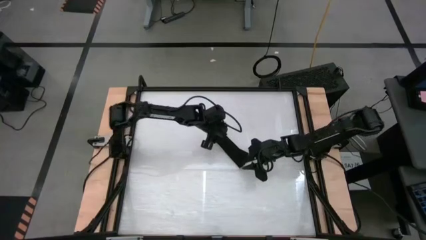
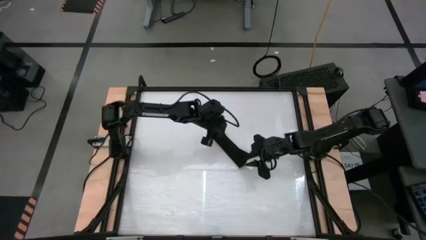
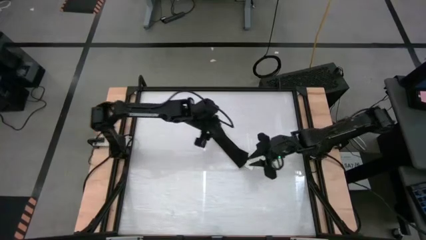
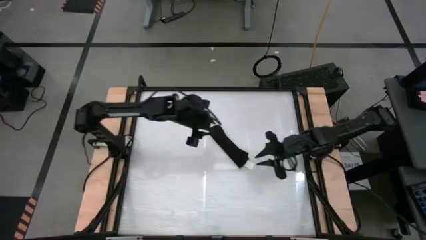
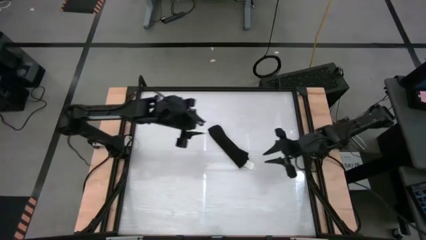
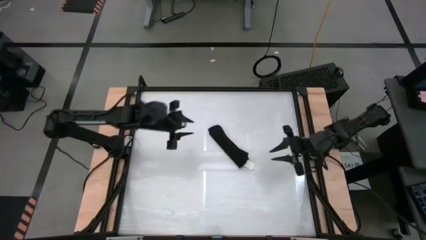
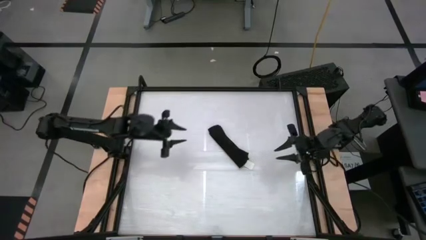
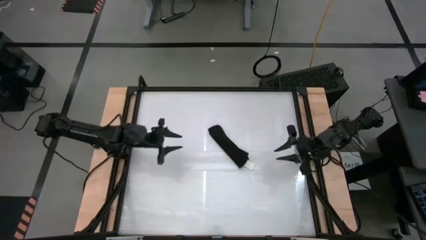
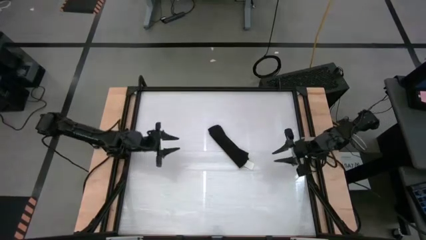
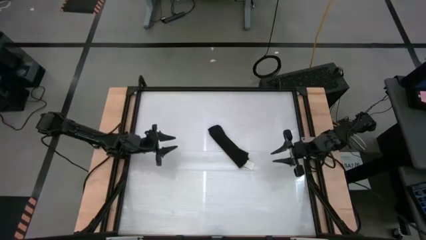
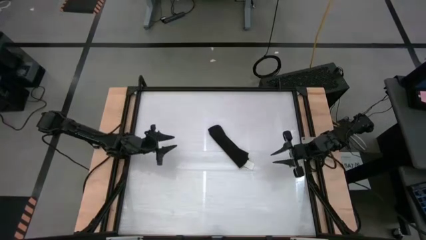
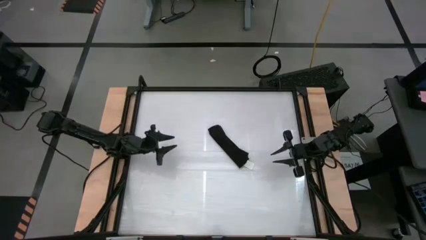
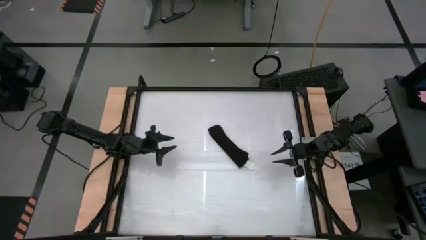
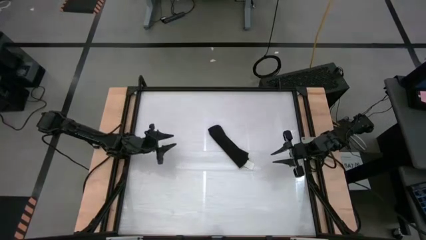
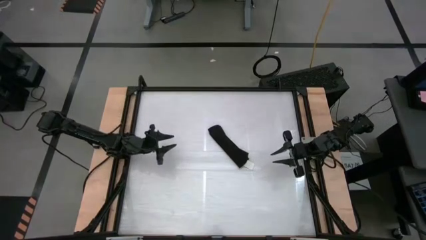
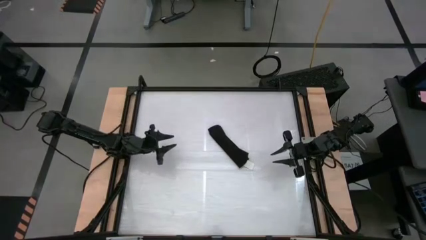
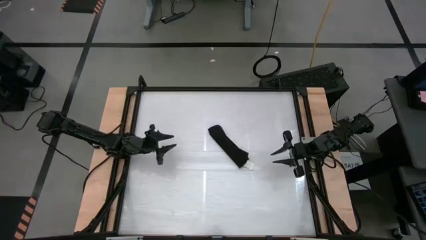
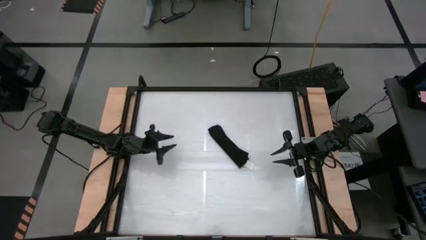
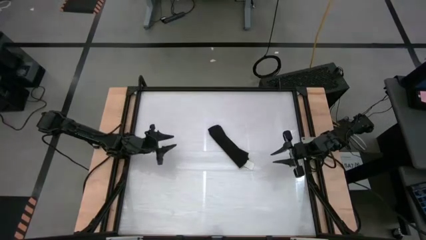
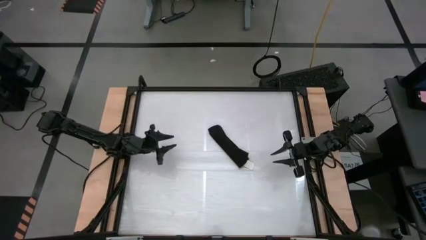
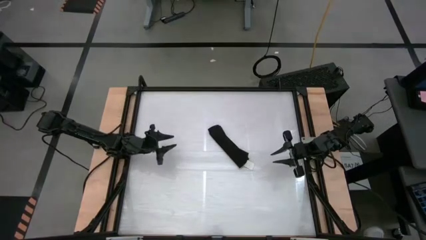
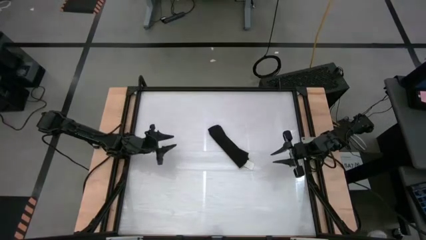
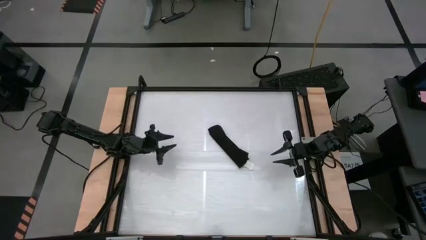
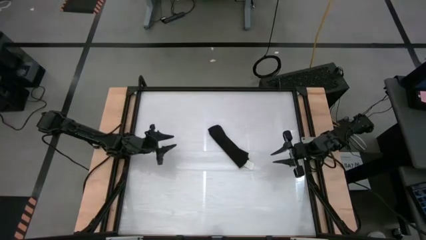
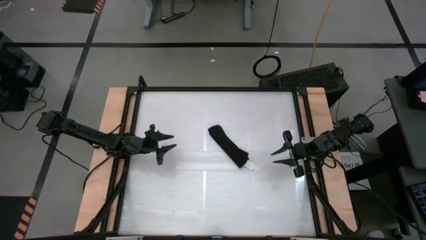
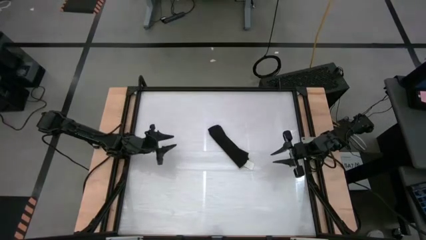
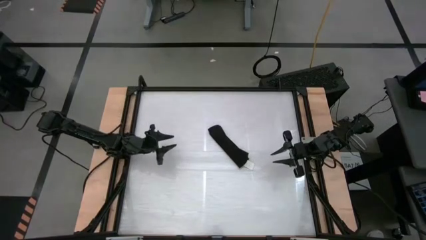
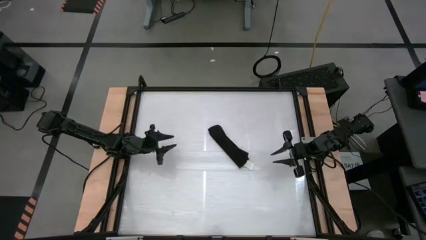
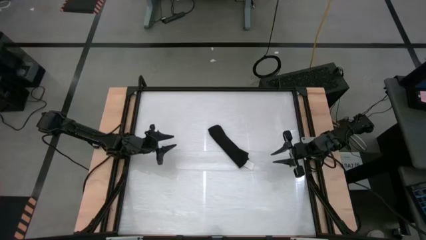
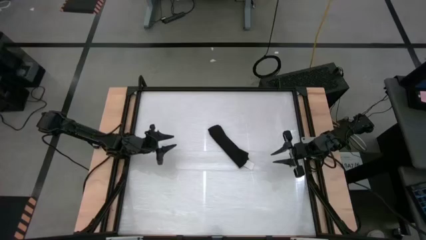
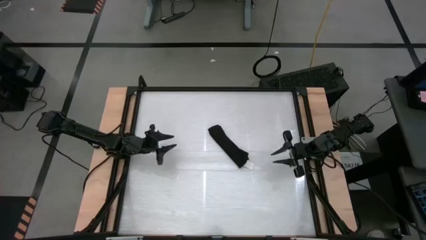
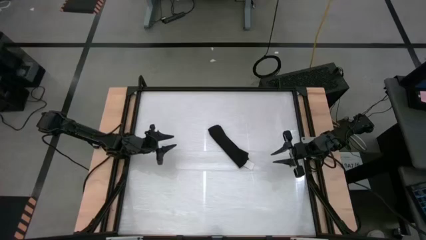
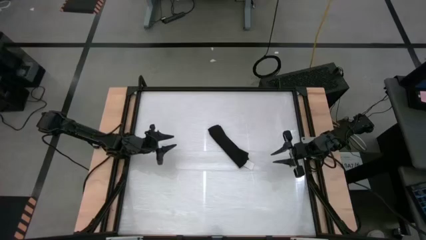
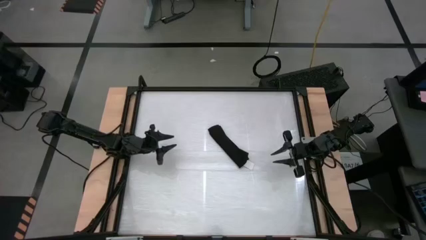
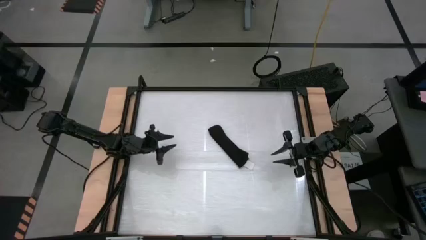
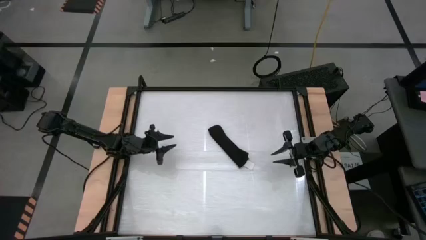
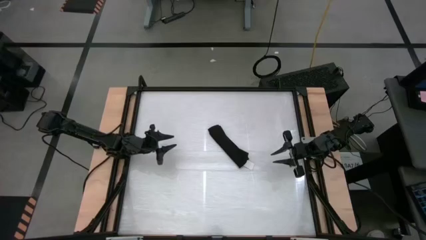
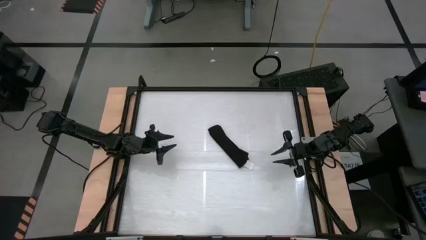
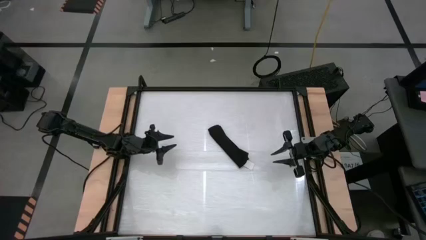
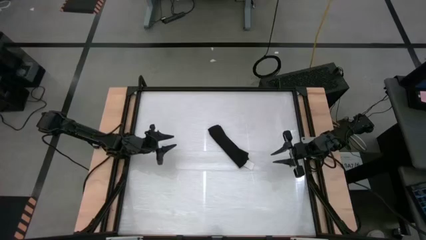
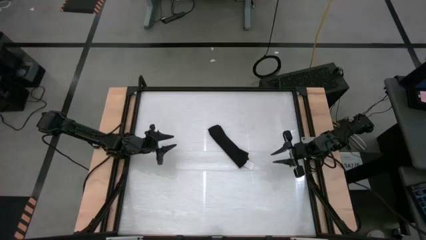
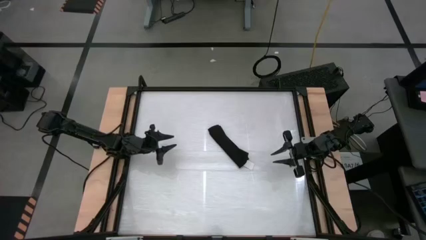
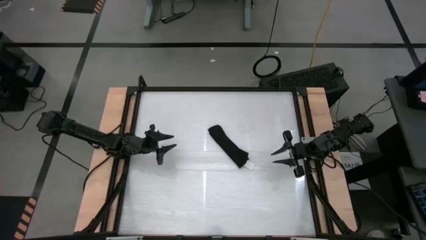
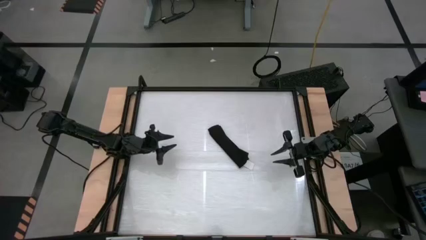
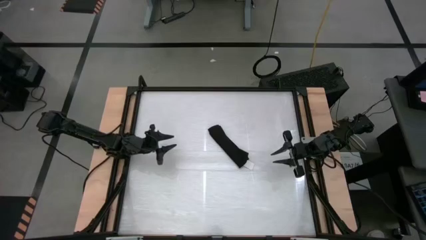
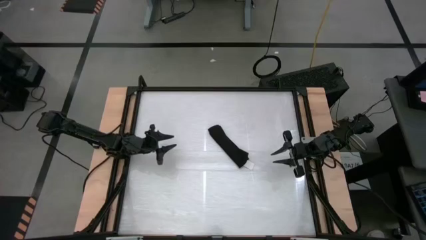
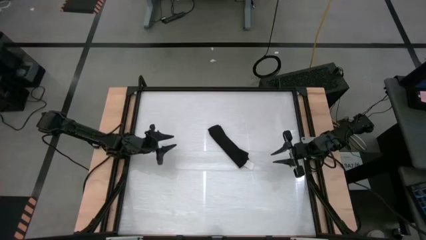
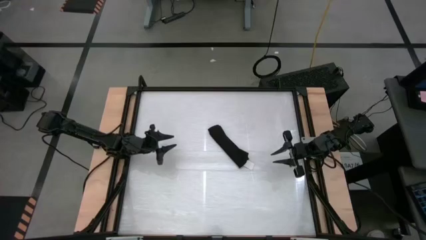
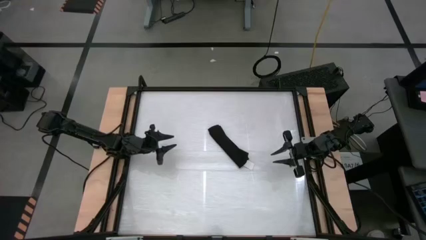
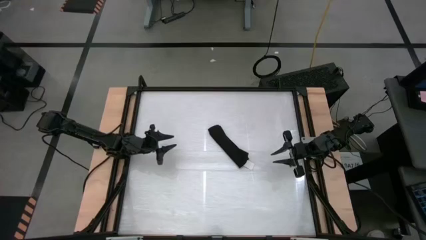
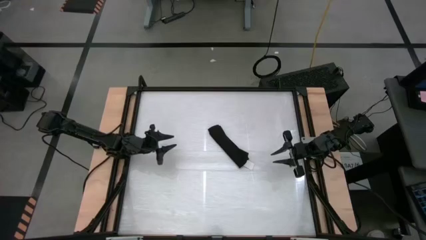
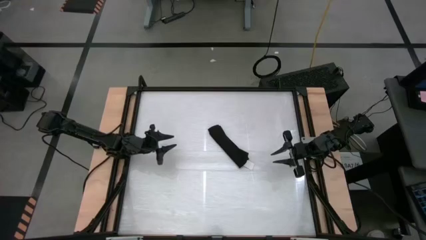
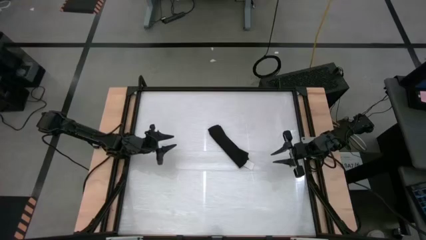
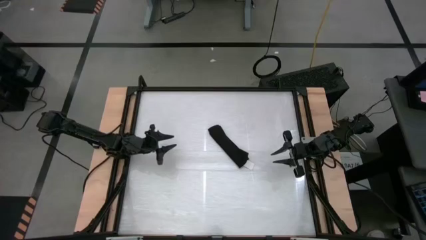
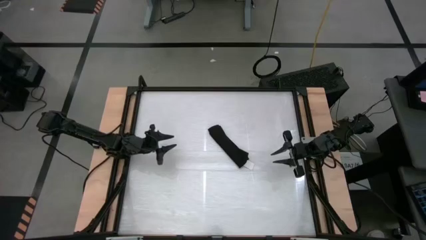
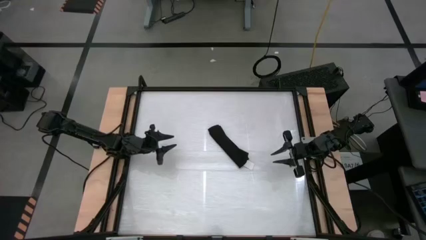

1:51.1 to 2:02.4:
Task: Roll towel
Return to Home Position
